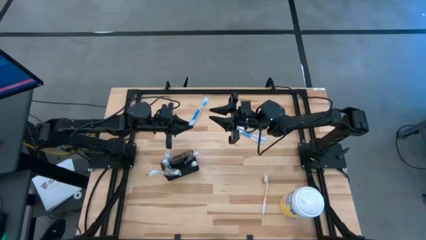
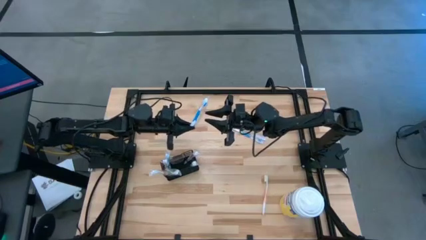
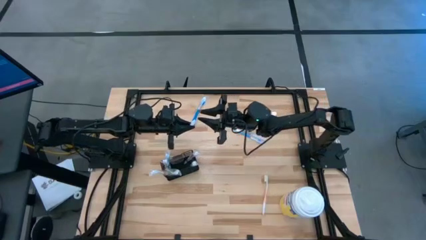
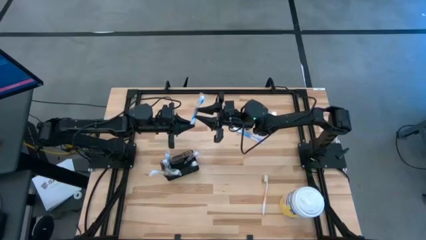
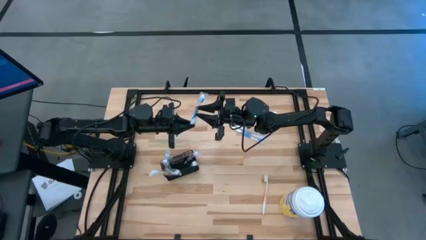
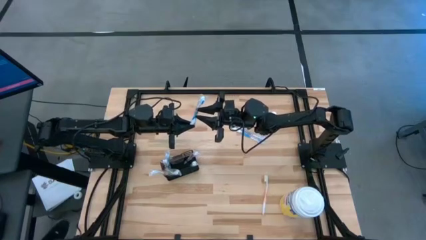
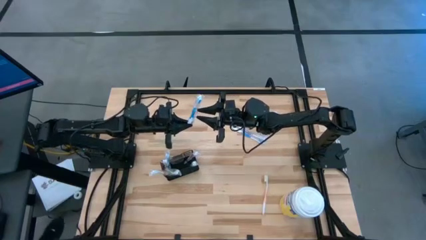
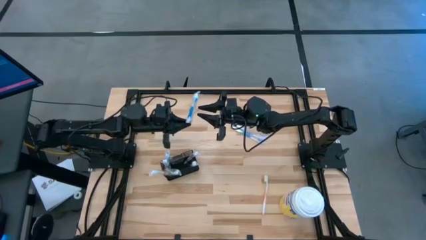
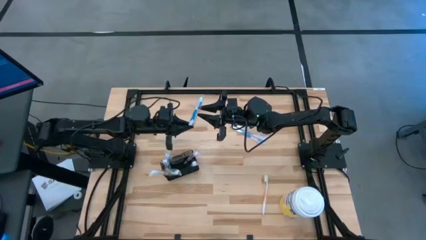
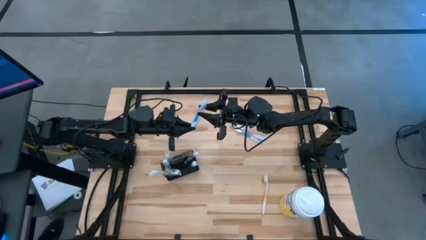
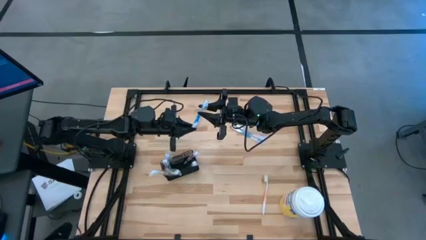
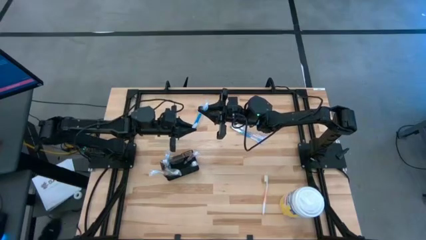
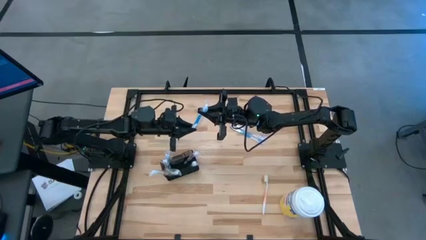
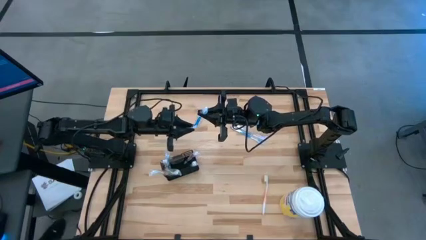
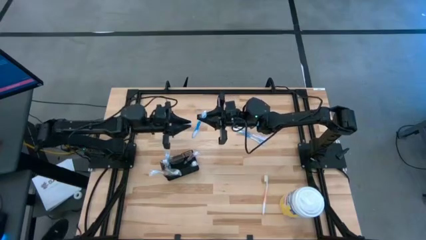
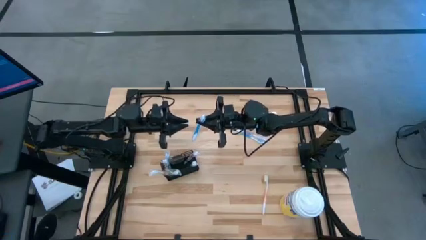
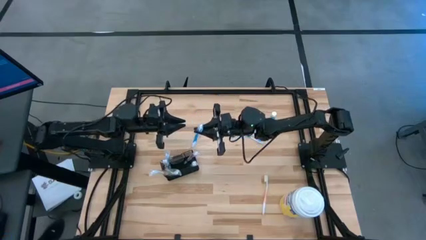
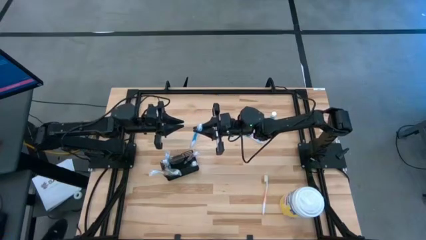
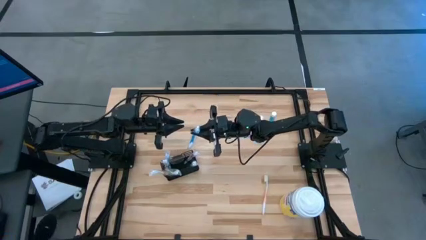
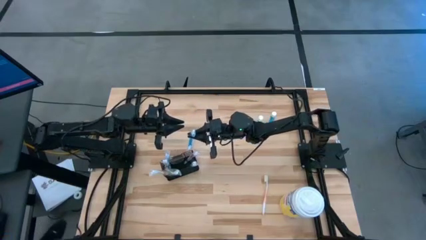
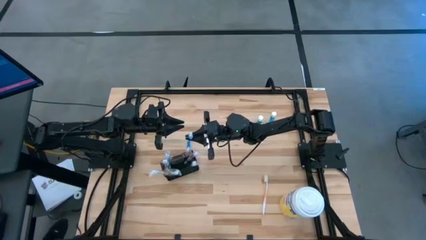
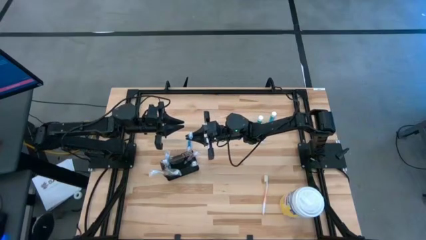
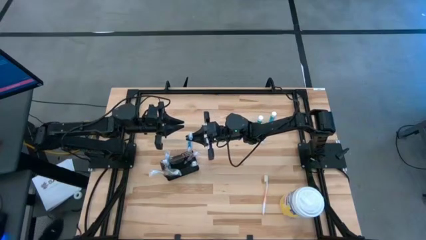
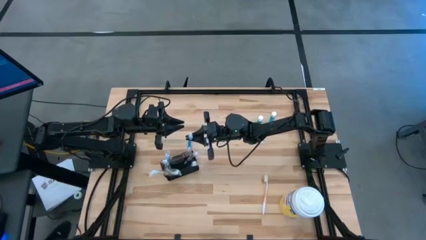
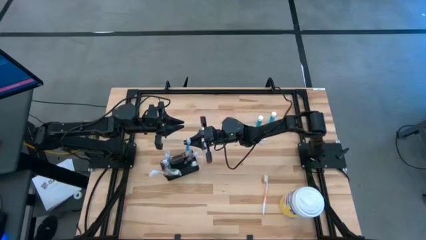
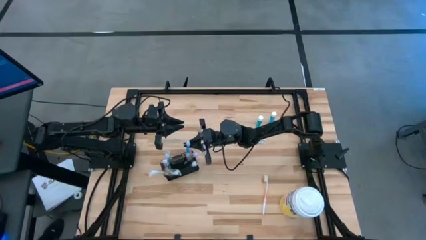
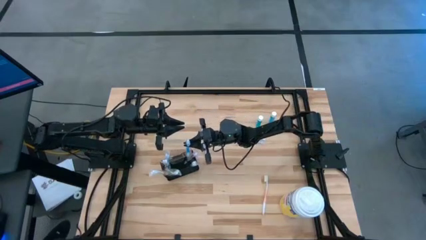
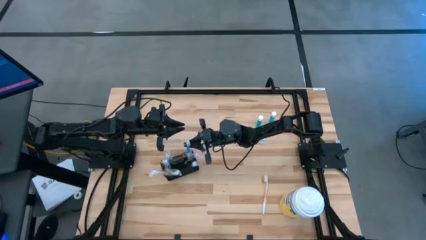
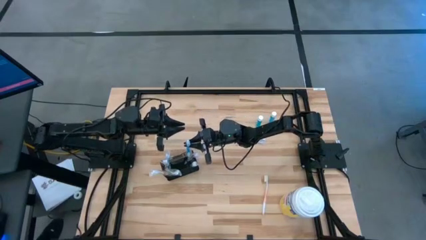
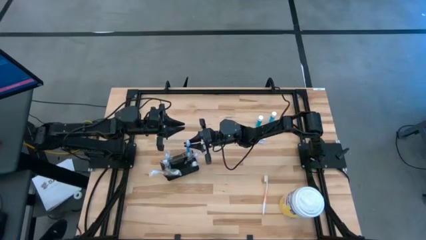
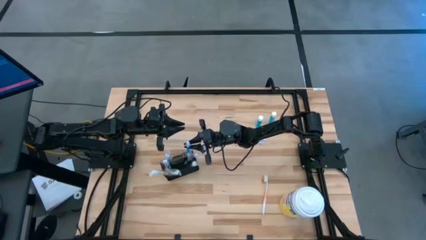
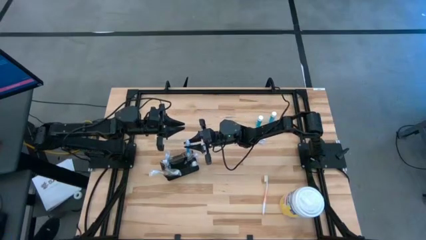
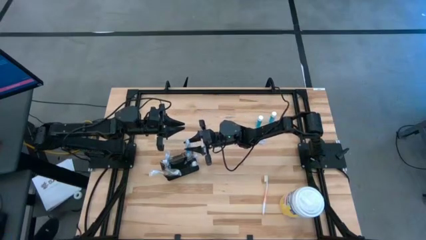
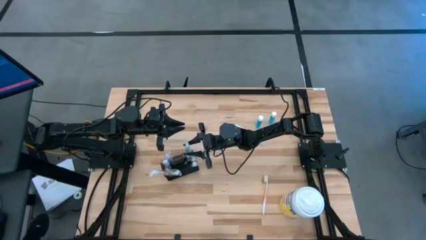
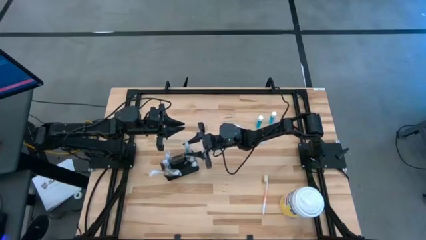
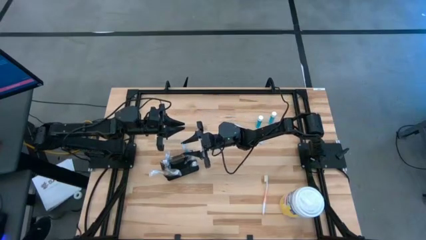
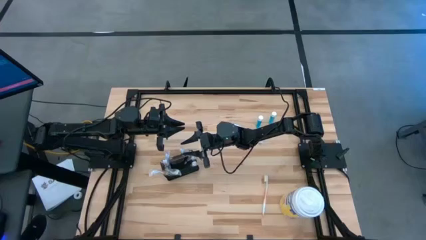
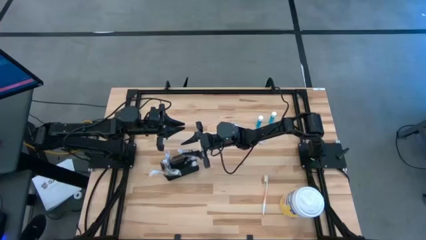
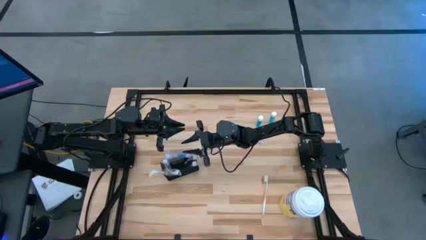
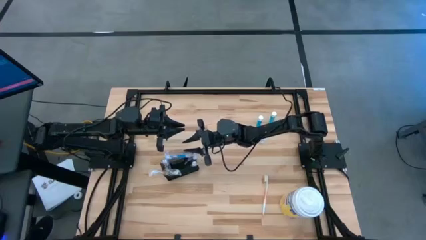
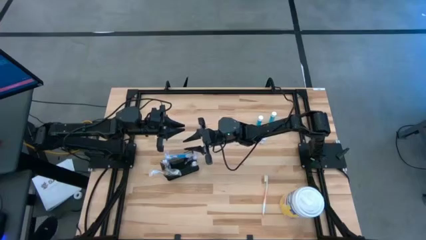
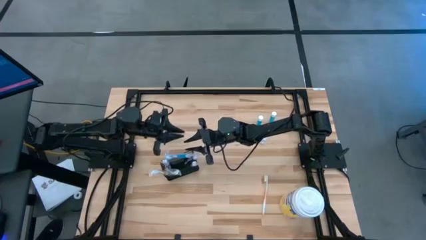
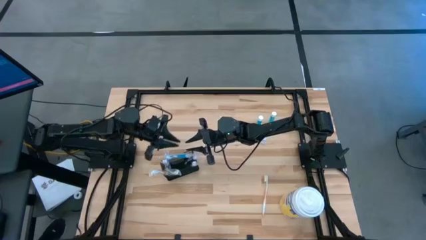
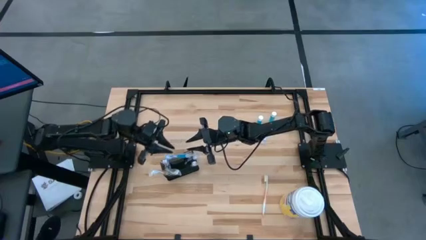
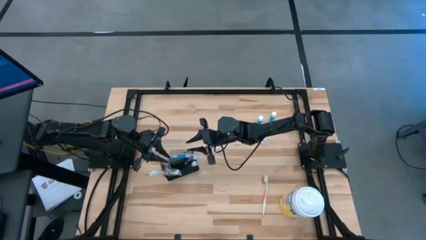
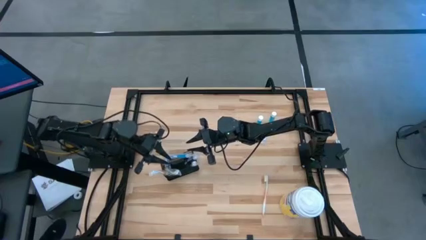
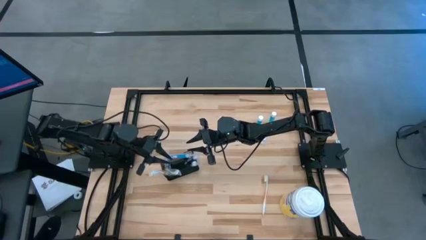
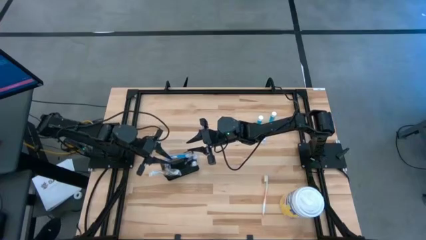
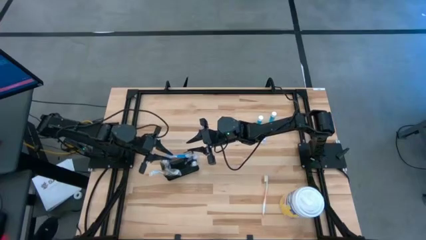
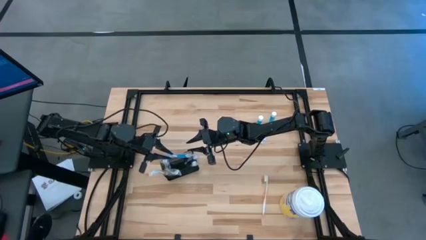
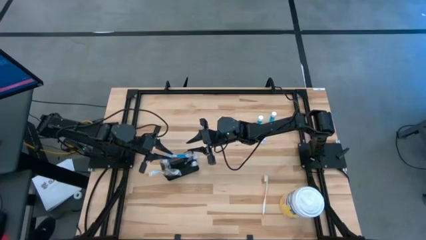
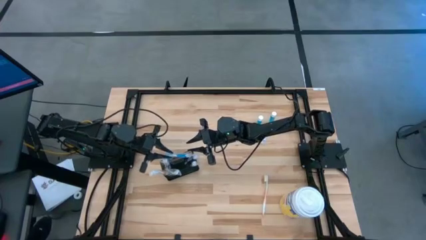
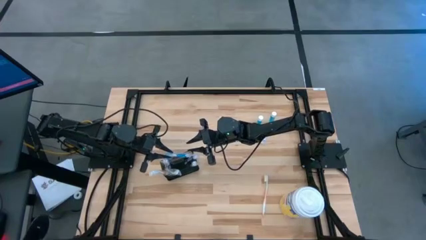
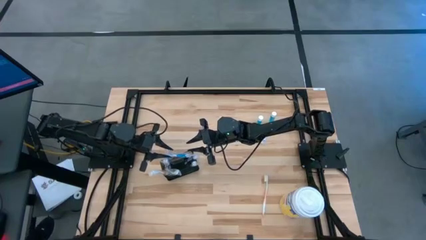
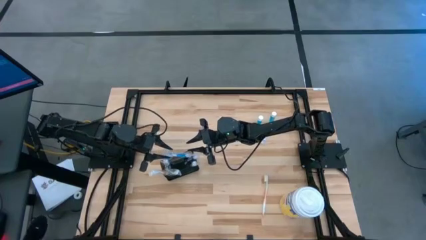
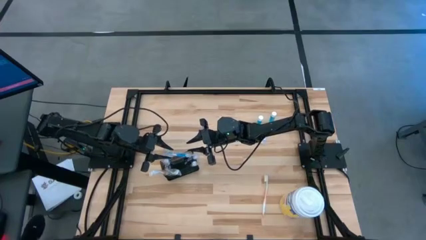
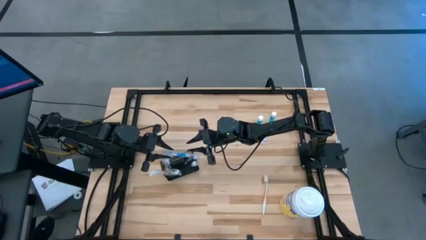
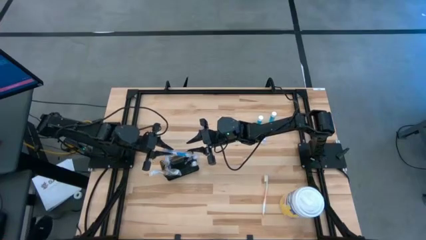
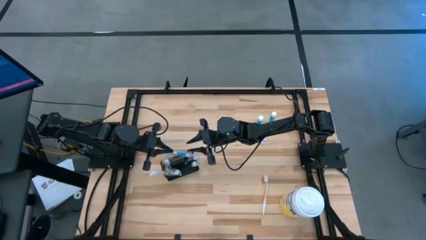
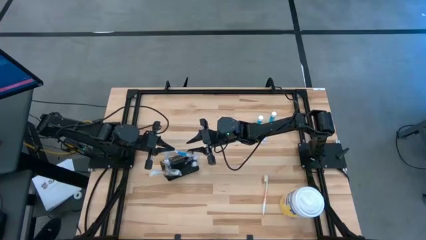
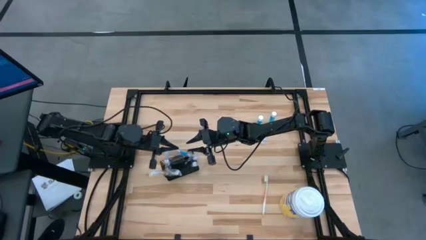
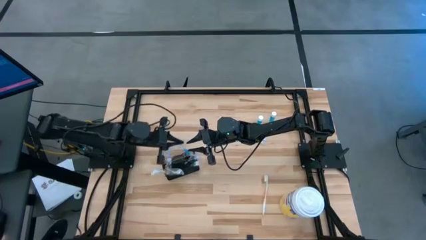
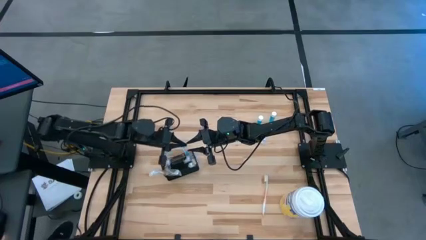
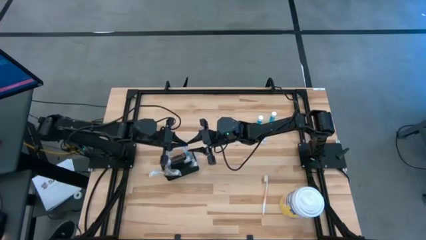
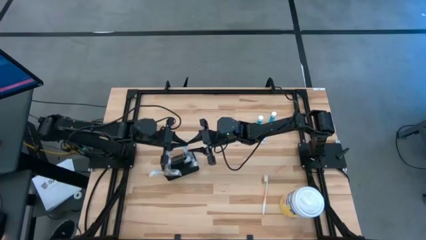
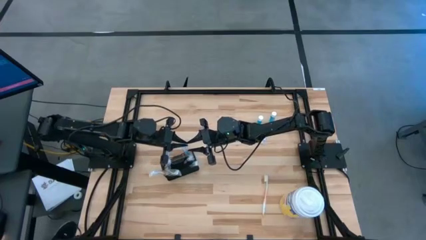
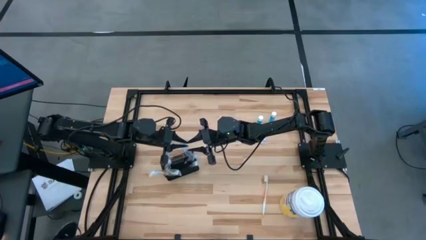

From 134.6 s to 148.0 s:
Task: Pick & Place toothbrushing station
Put the left blue toothbrush into the top right section of the mesh organizer

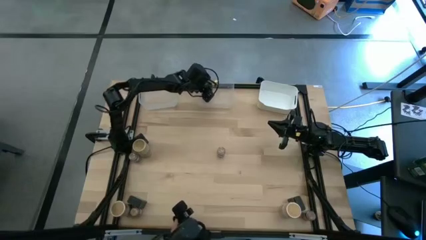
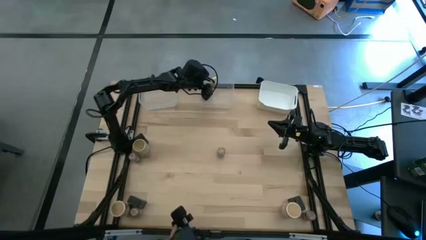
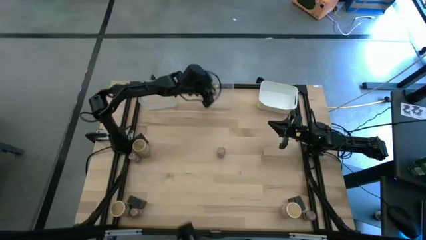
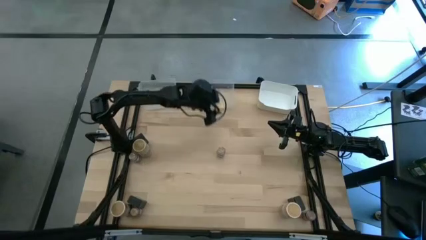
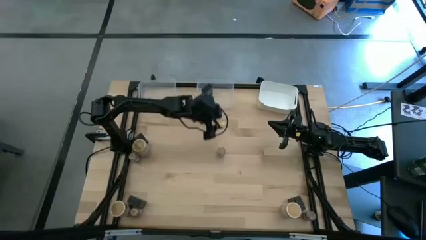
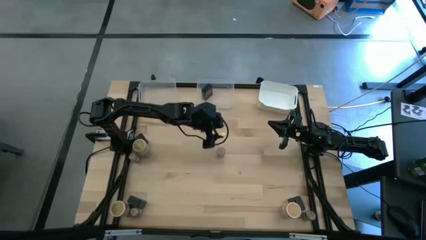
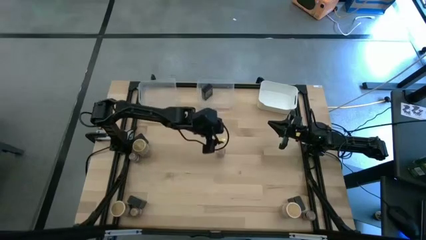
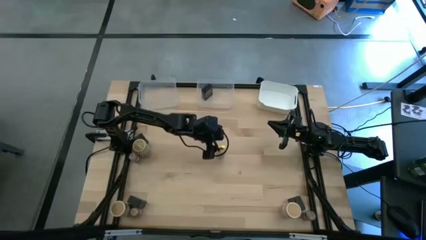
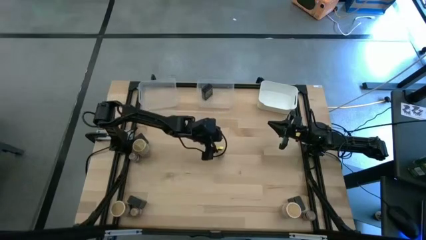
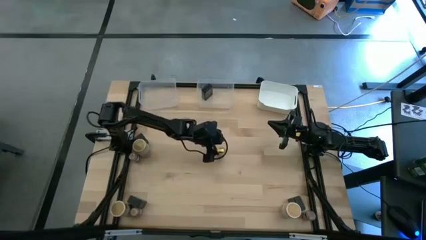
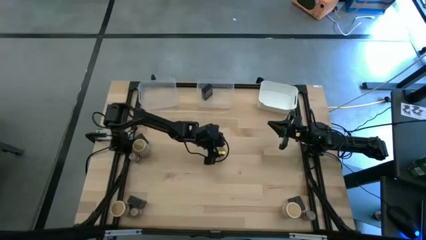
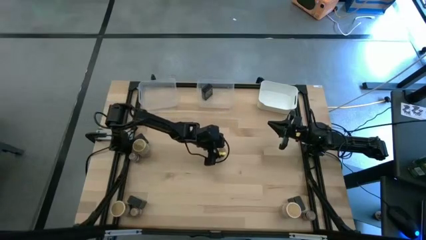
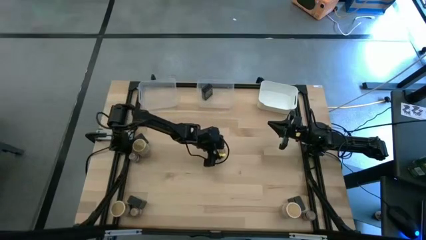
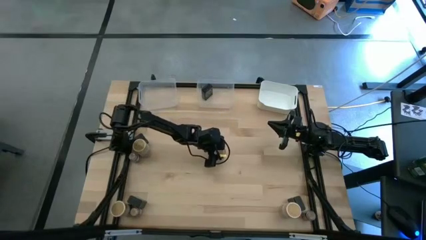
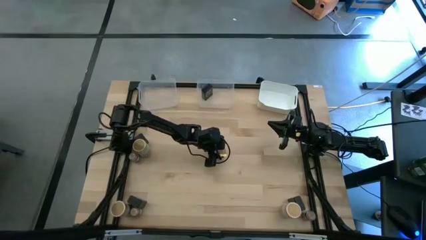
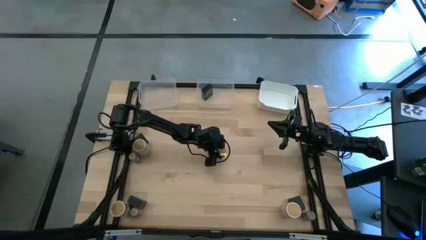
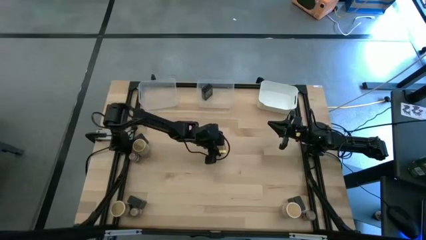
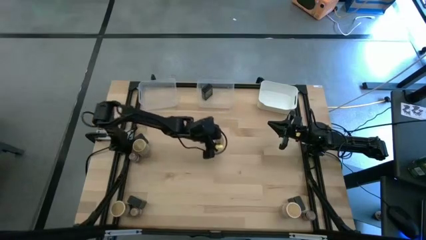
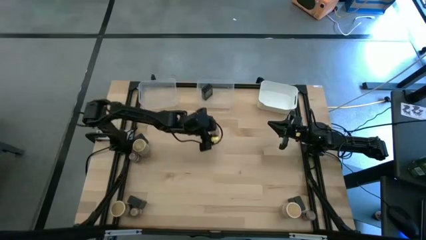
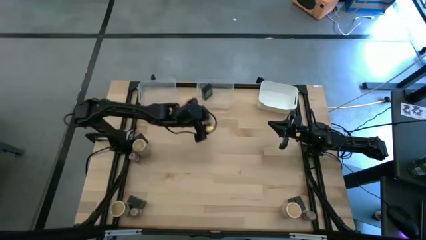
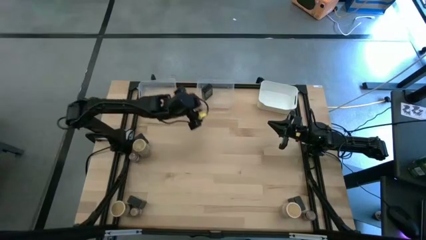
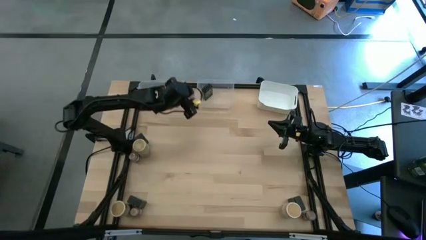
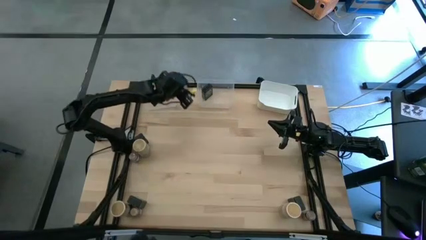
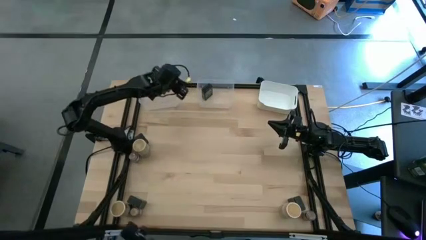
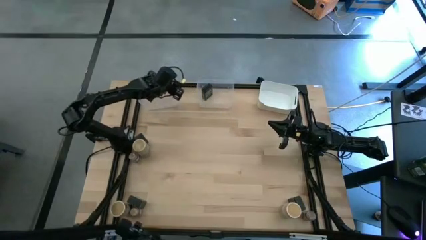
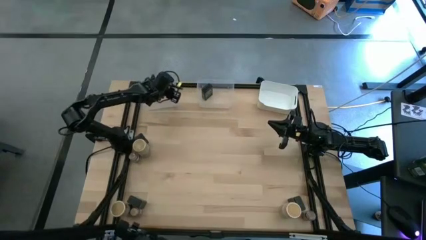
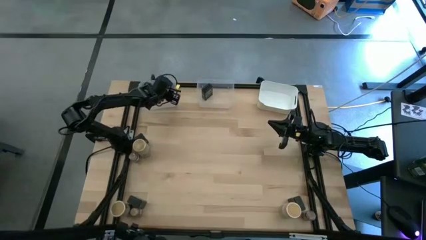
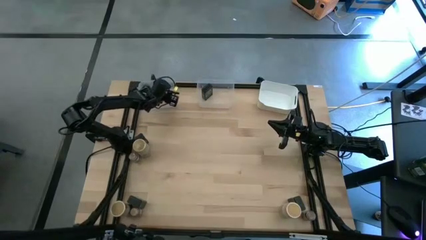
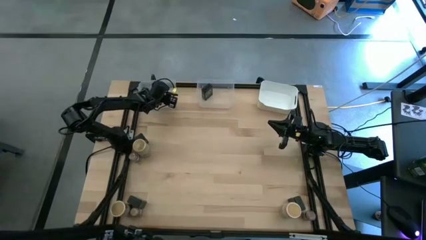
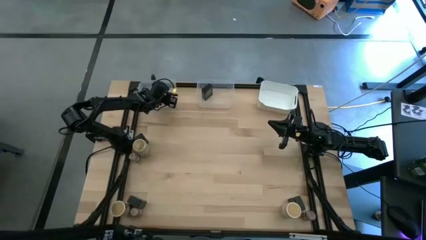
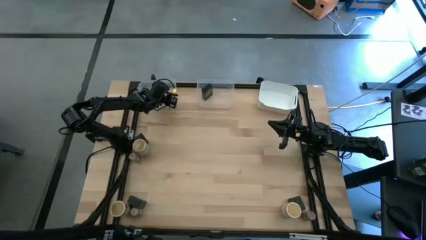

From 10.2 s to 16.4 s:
Task: Sort spices by type
Put the center brown seasoning bottle into the left transparent bin
